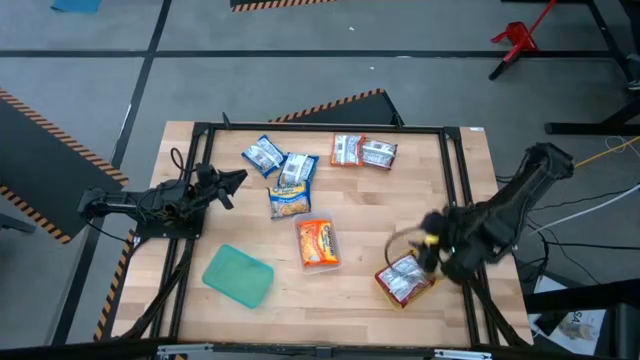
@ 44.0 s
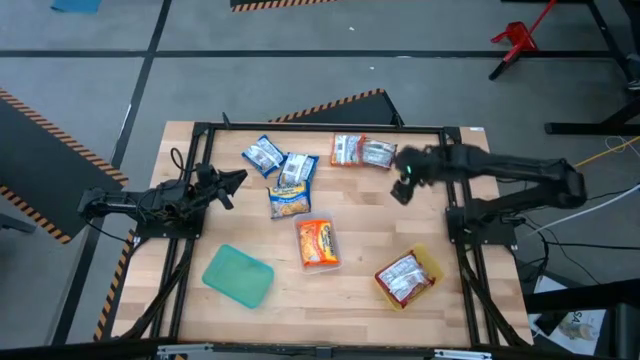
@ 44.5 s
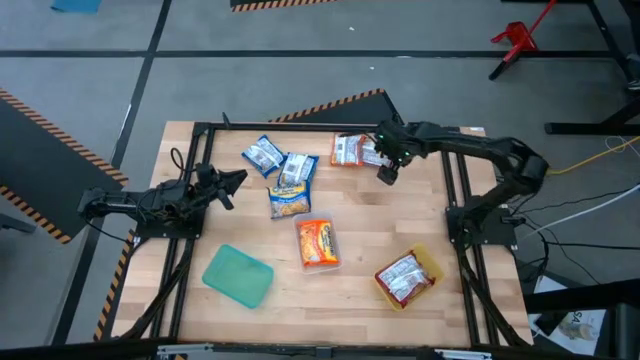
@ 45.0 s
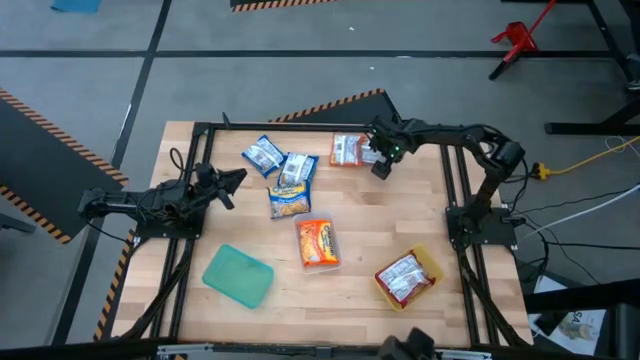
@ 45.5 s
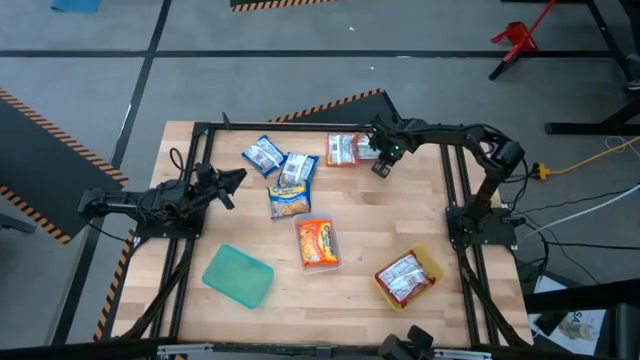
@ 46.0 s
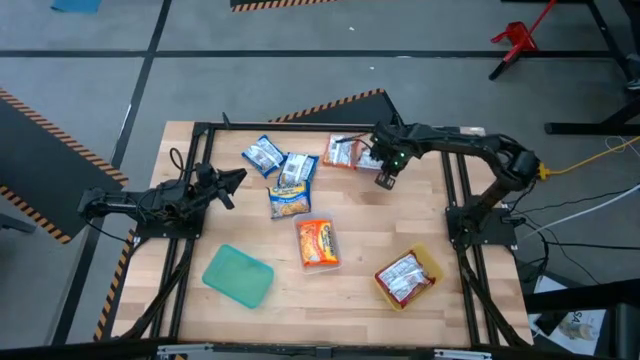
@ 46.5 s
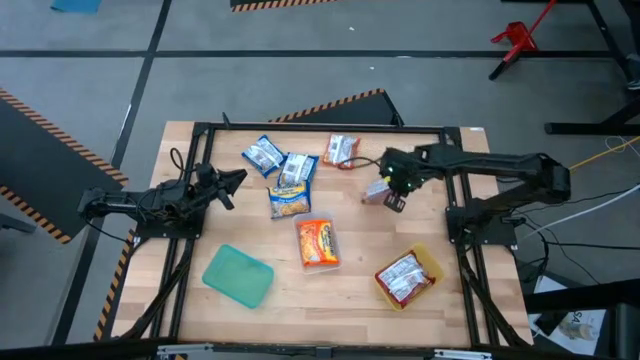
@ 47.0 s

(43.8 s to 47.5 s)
Task: Sort Maruchan noodles
Put the red noodle pack into the yellow bin

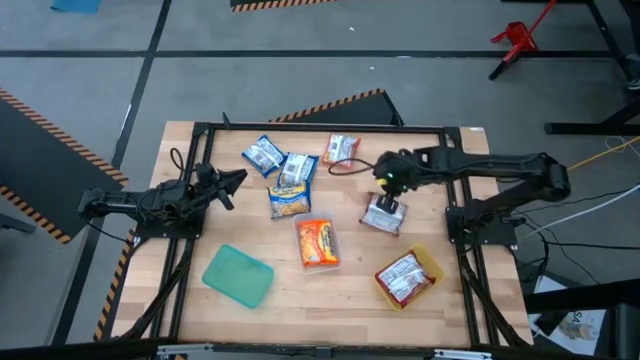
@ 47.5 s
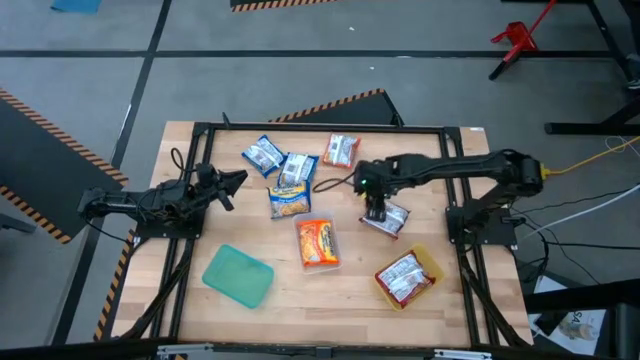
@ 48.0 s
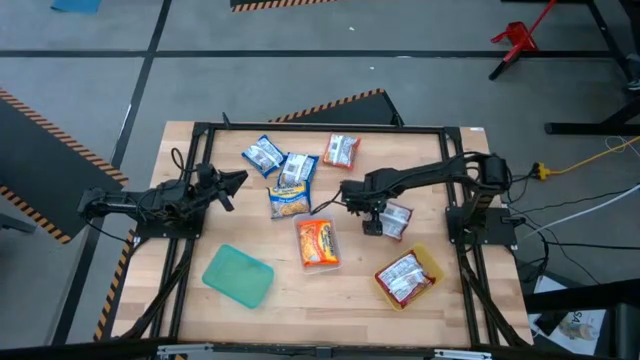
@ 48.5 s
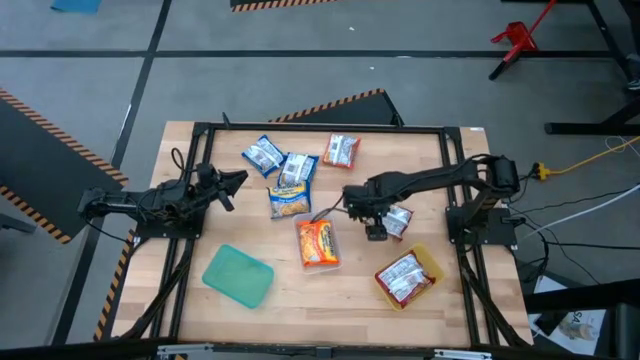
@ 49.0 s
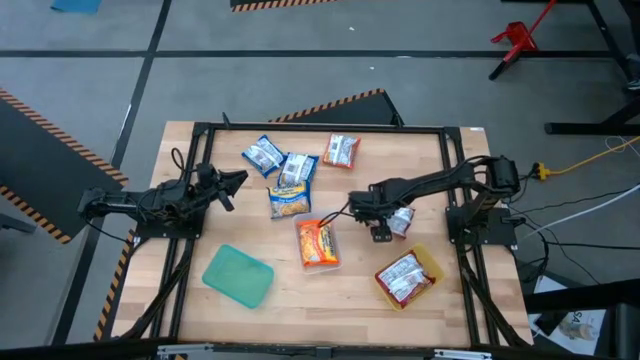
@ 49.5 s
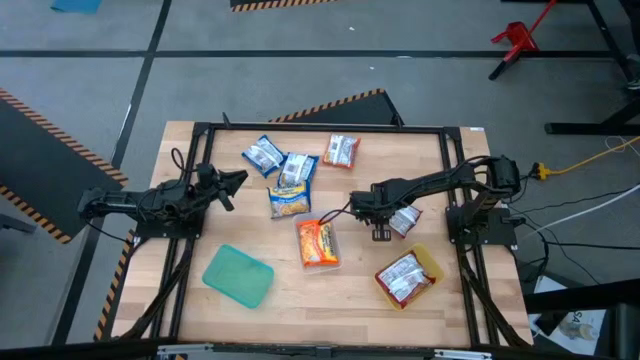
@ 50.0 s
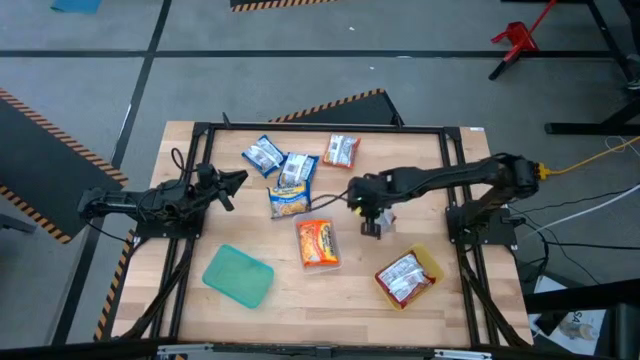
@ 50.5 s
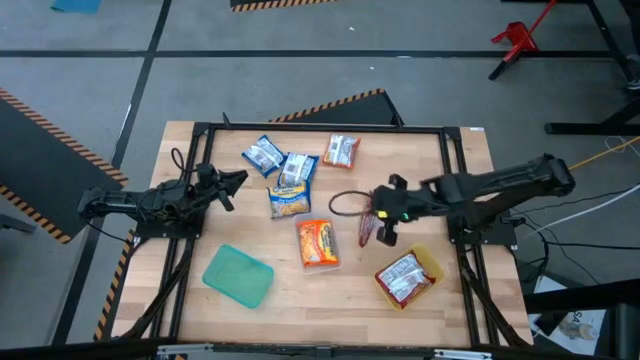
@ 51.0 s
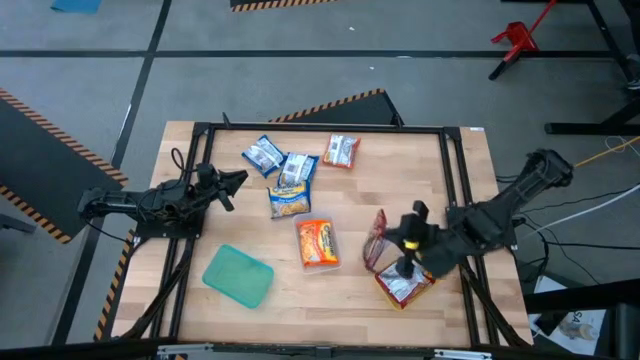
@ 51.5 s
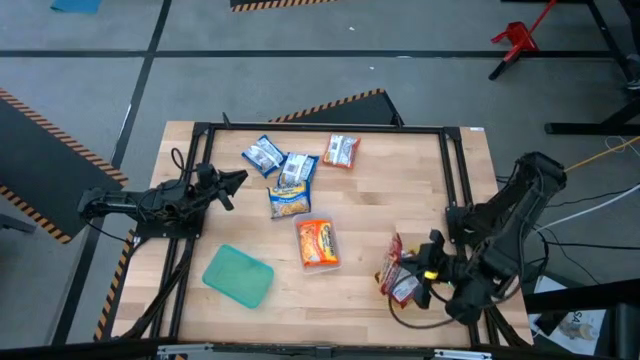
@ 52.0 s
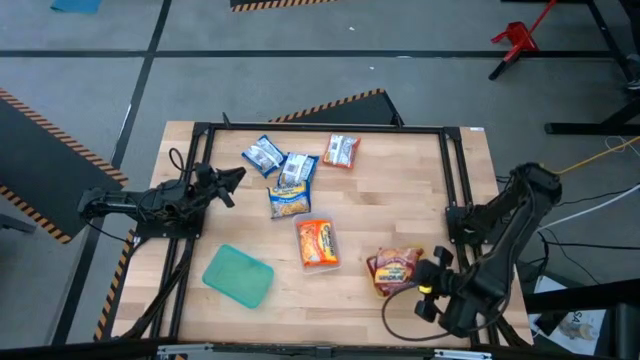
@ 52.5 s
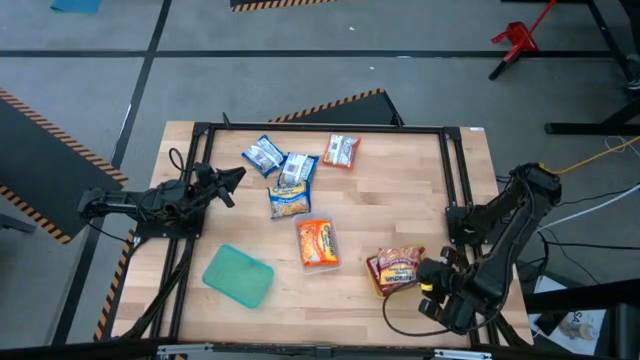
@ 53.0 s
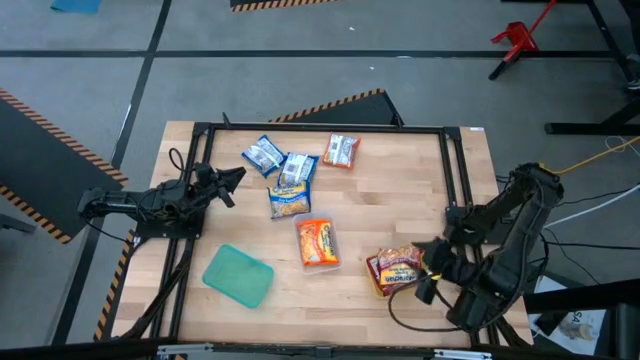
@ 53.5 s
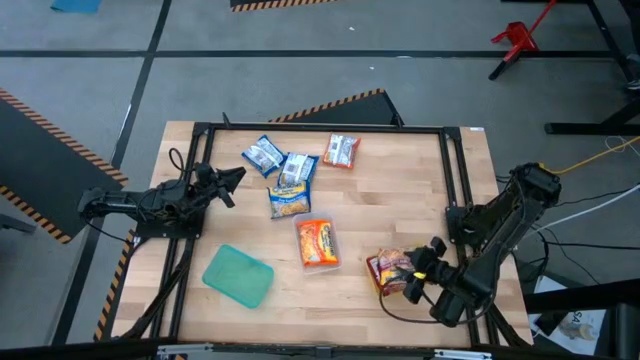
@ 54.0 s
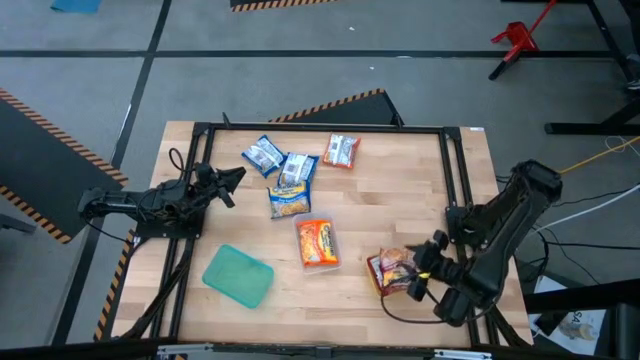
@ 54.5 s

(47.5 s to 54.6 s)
Put the red noodle pack into the yellow bin

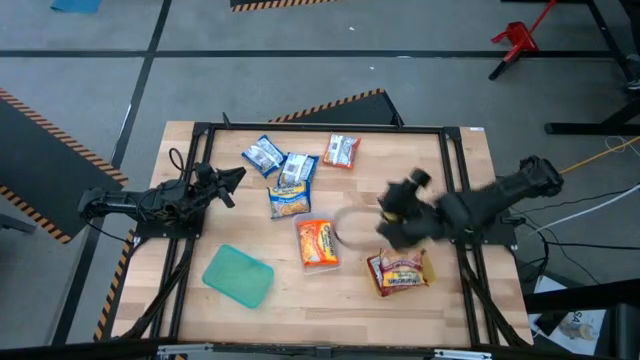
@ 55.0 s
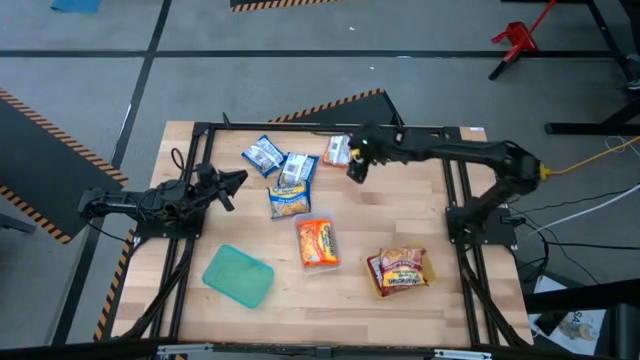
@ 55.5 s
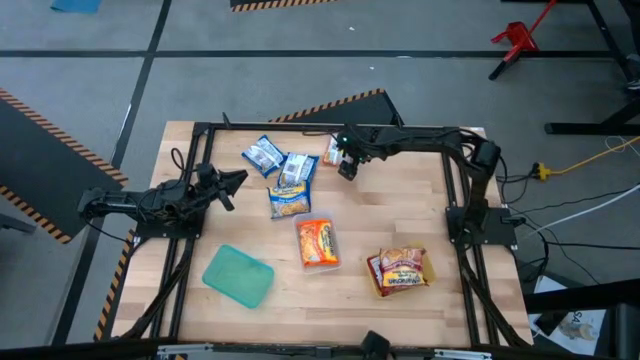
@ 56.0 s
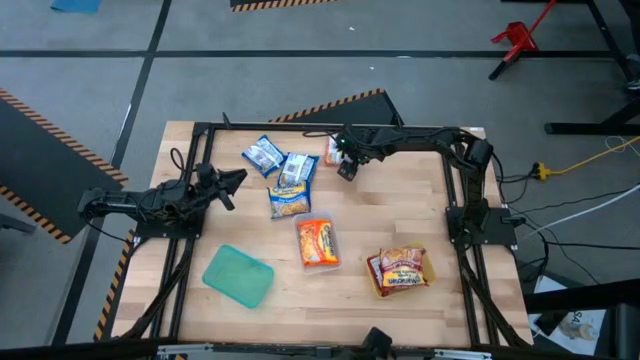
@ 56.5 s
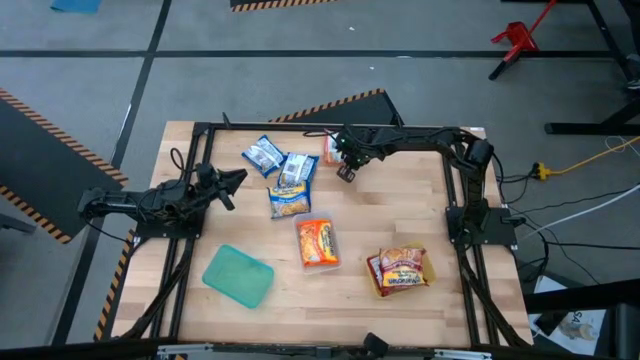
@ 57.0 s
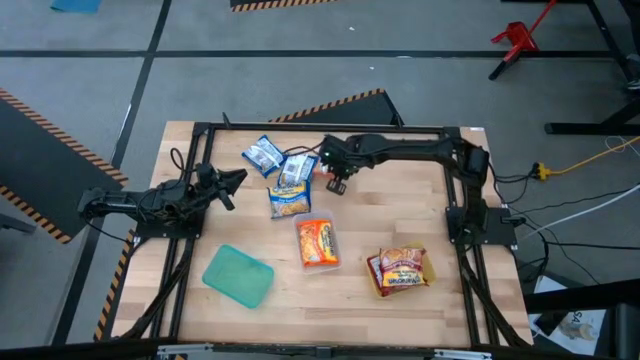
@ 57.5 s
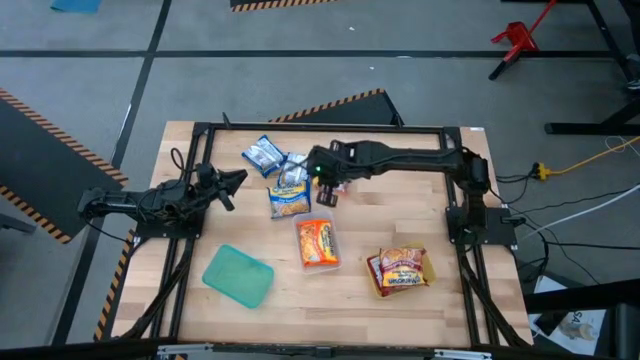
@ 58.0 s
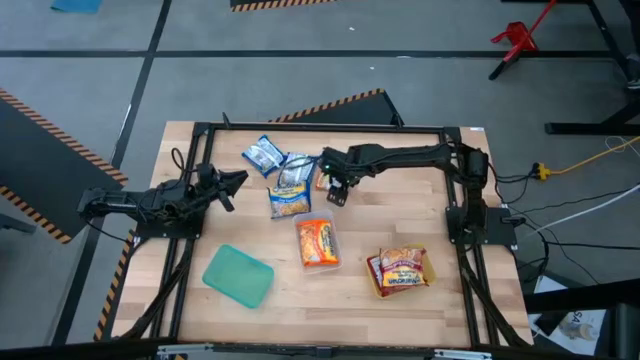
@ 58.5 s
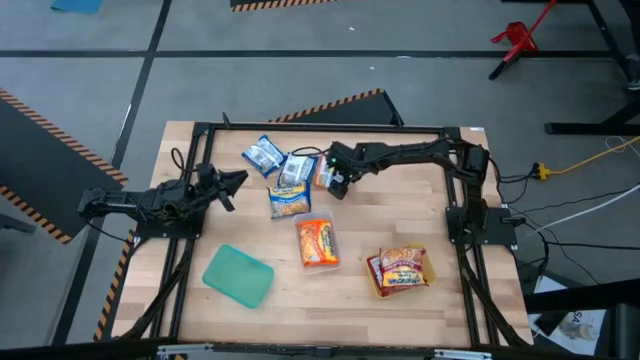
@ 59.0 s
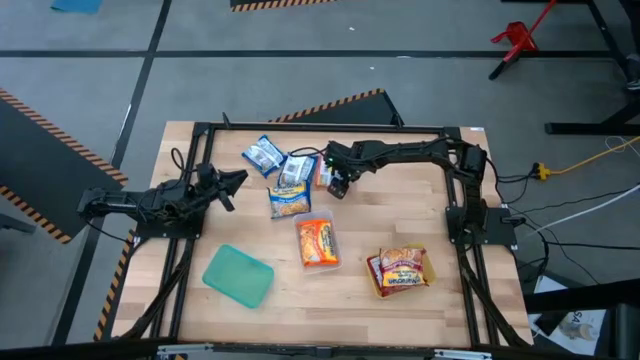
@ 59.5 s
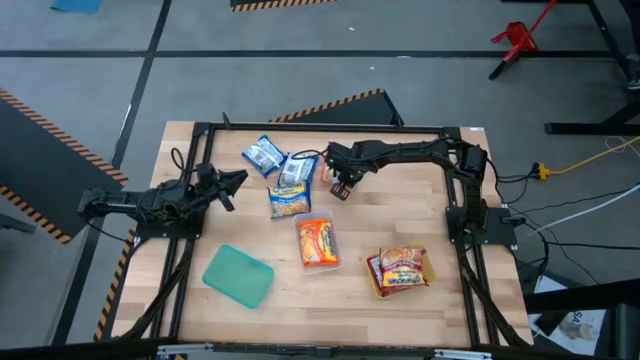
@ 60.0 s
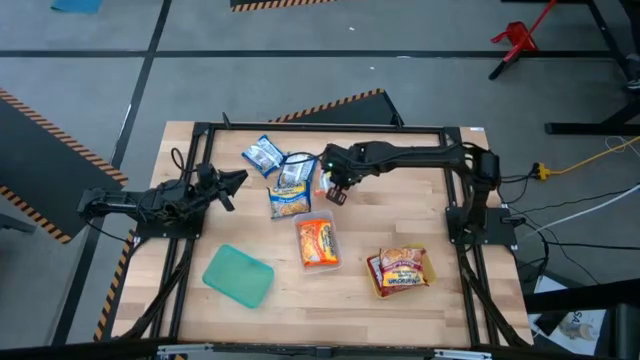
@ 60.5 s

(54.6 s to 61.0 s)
Put the orange noodle pack into the transparent bin

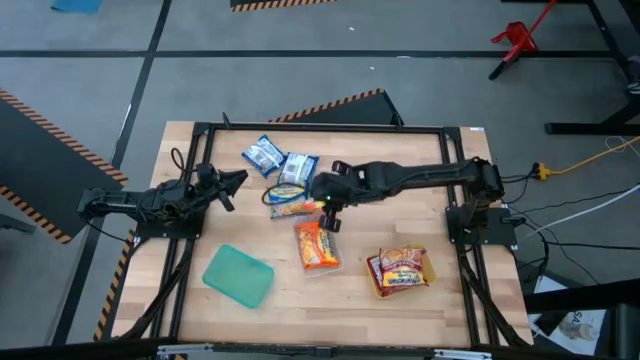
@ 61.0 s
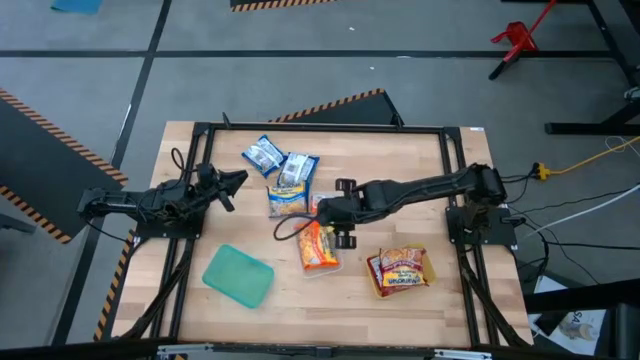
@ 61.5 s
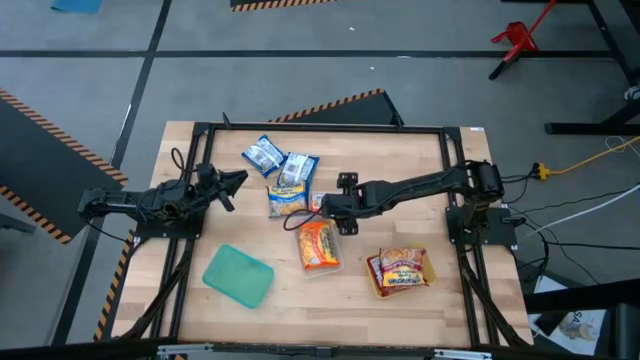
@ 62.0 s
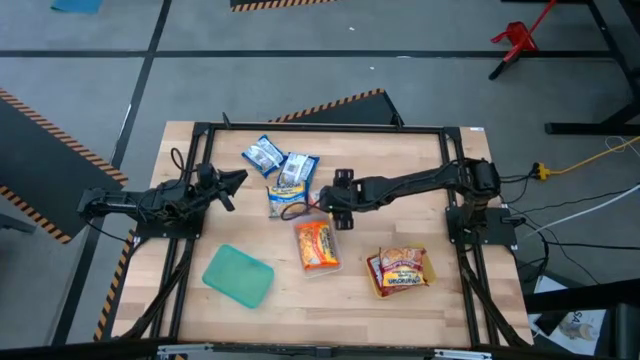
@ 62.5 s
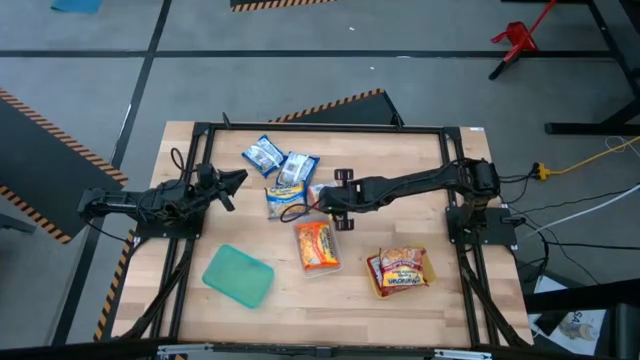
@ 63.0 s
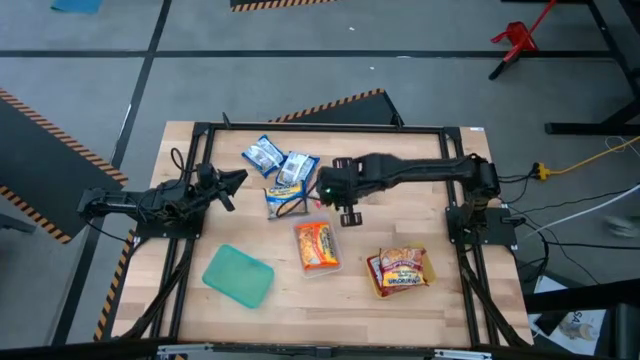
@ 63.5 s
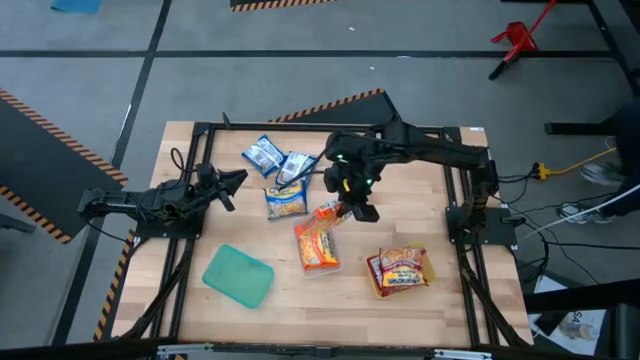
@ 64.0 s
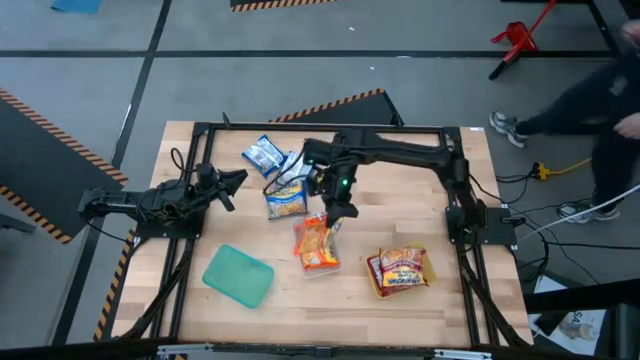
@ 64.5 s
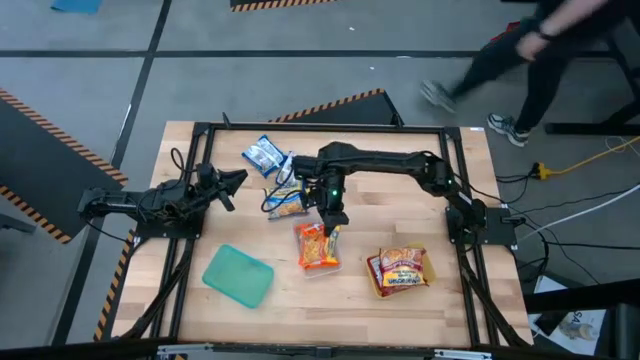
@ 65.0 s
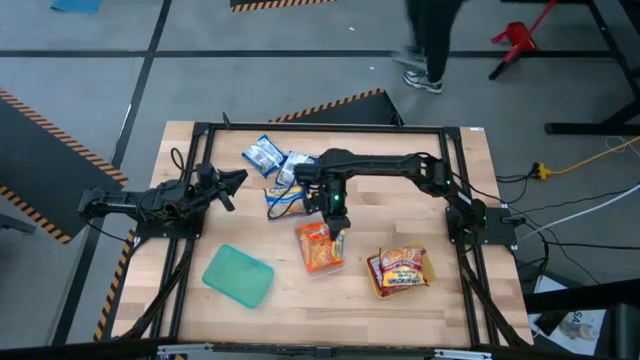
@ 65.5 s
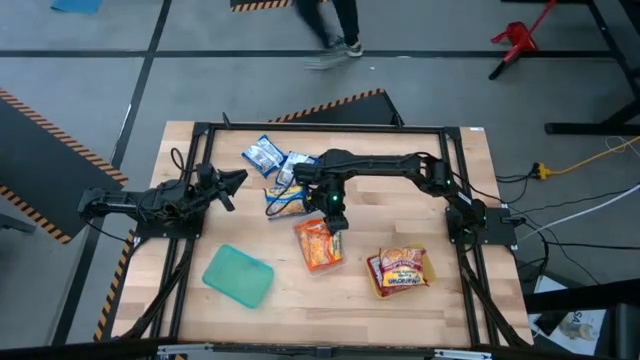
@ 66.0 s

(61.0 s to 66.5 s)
Put the orange noodle pack into the transparent bin
